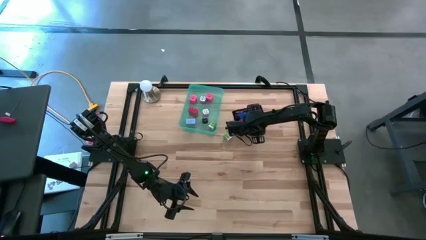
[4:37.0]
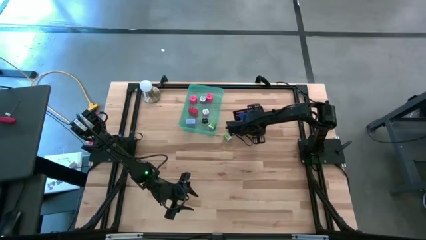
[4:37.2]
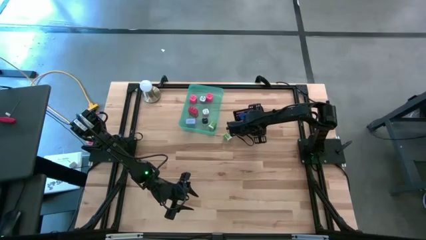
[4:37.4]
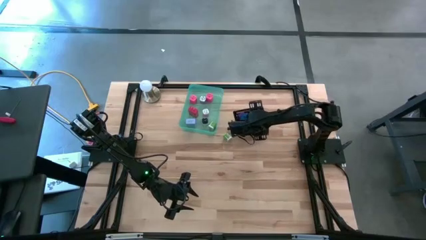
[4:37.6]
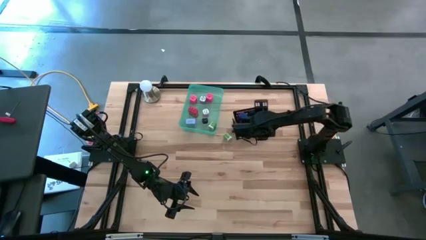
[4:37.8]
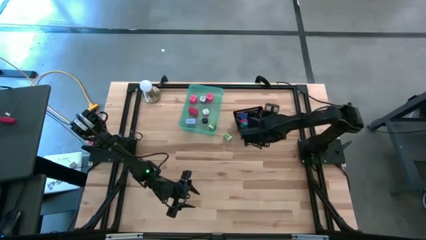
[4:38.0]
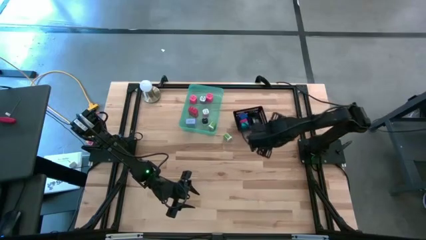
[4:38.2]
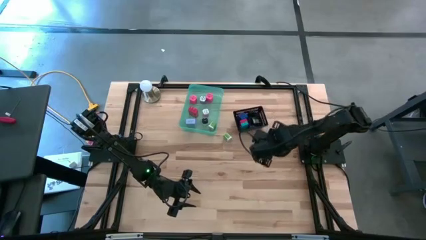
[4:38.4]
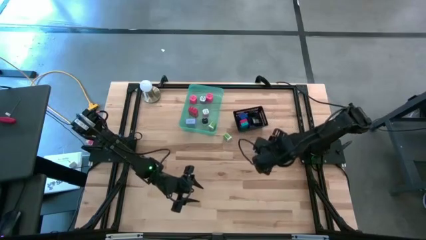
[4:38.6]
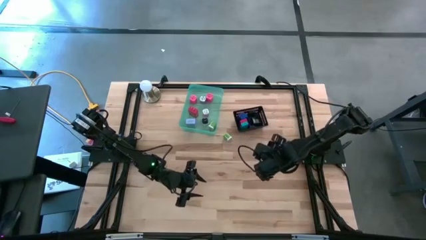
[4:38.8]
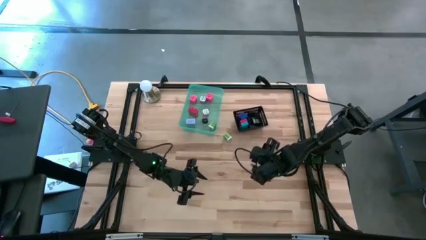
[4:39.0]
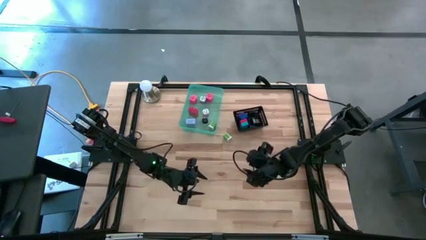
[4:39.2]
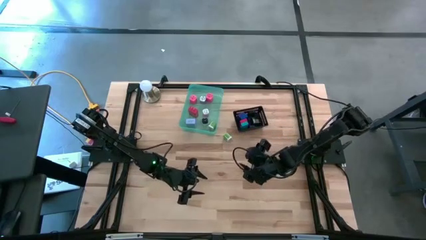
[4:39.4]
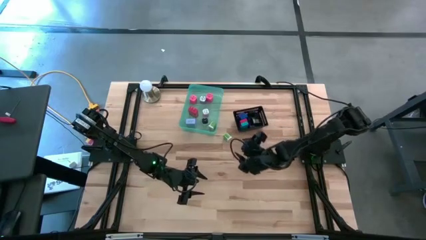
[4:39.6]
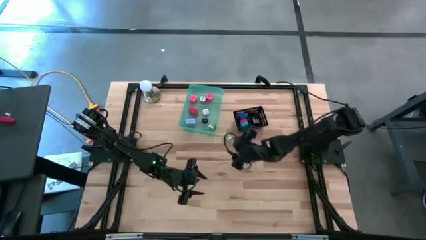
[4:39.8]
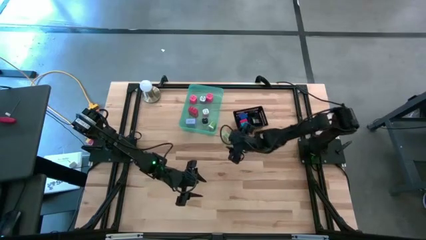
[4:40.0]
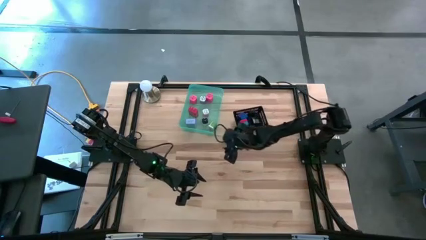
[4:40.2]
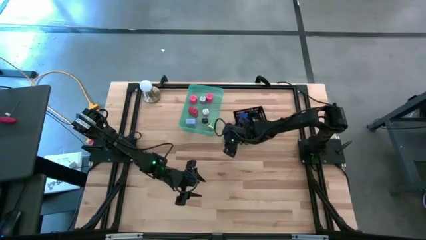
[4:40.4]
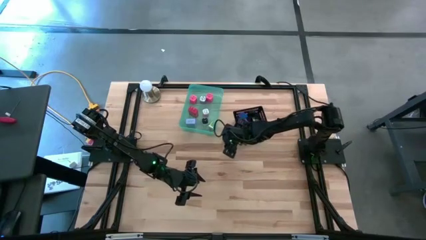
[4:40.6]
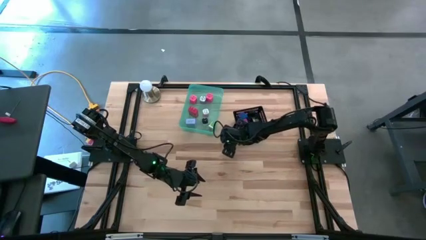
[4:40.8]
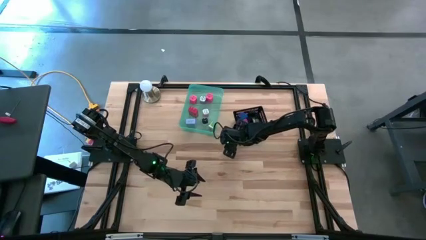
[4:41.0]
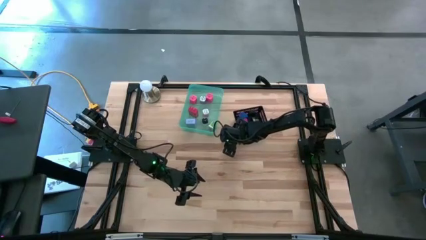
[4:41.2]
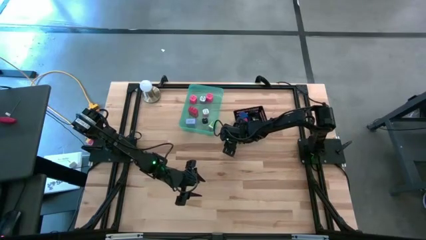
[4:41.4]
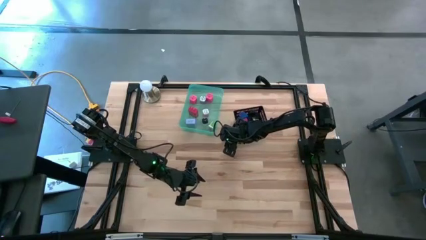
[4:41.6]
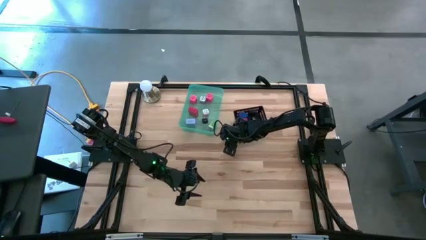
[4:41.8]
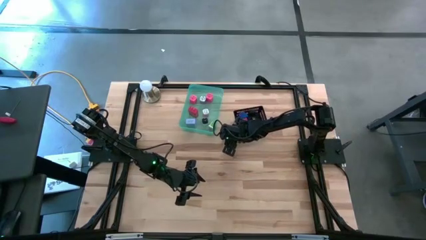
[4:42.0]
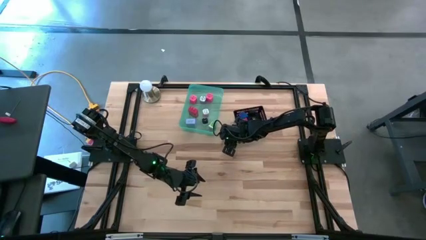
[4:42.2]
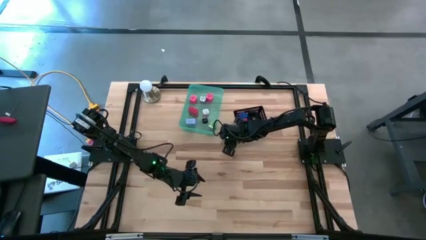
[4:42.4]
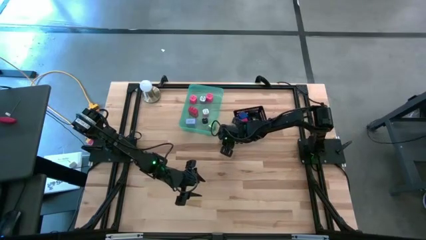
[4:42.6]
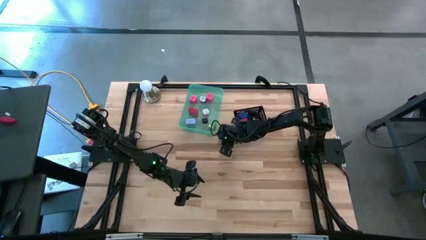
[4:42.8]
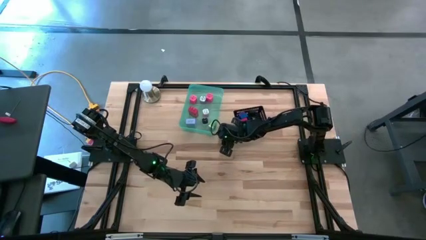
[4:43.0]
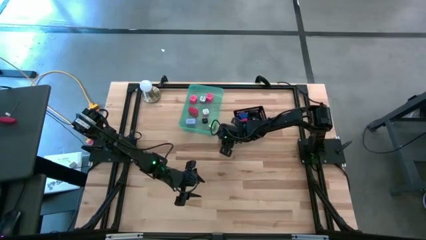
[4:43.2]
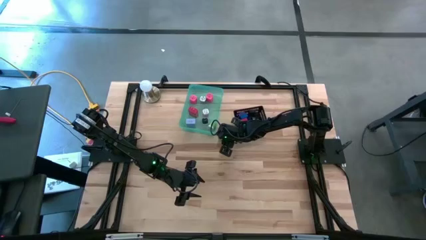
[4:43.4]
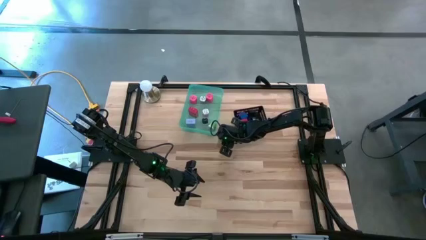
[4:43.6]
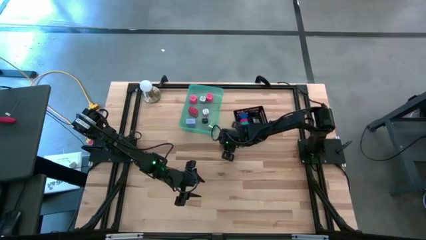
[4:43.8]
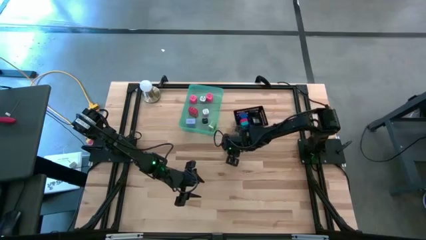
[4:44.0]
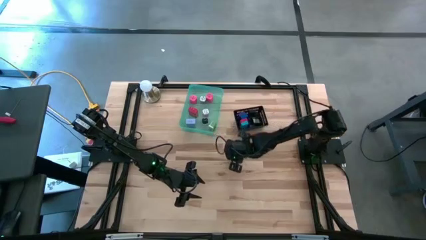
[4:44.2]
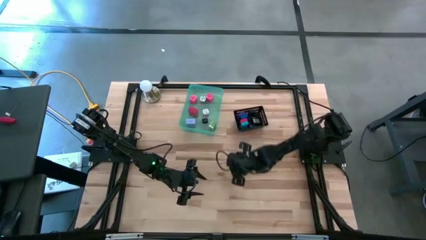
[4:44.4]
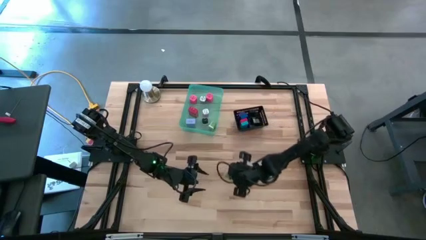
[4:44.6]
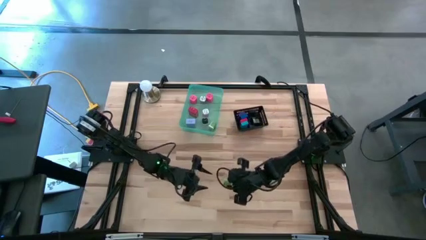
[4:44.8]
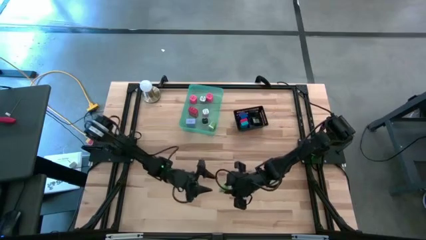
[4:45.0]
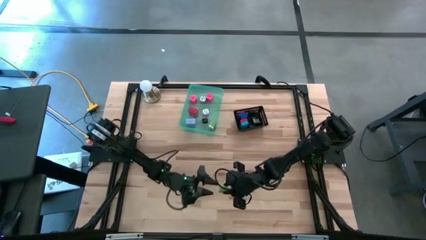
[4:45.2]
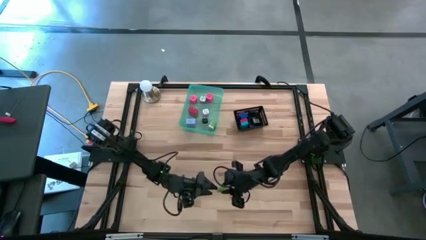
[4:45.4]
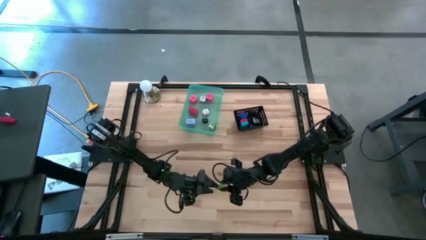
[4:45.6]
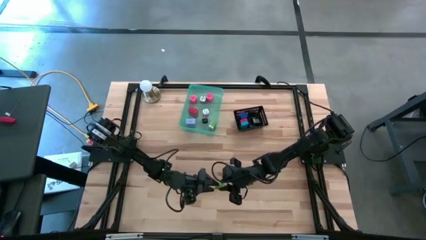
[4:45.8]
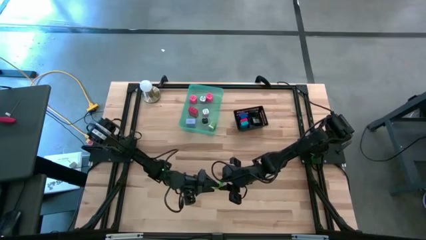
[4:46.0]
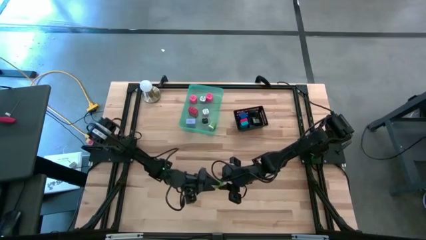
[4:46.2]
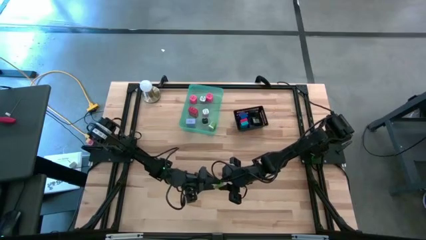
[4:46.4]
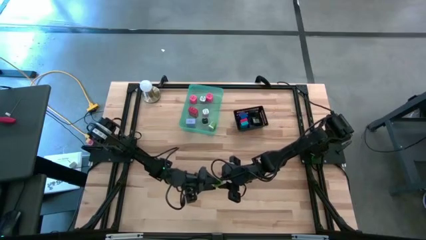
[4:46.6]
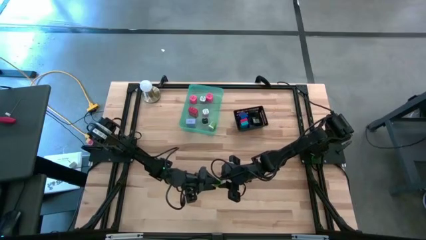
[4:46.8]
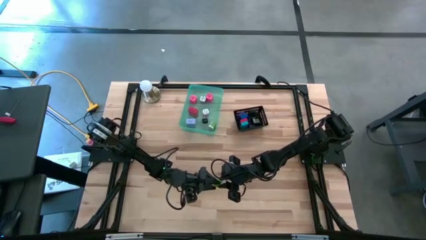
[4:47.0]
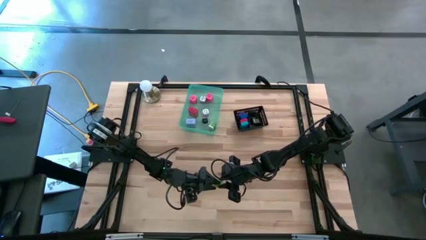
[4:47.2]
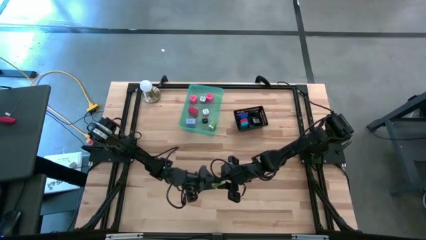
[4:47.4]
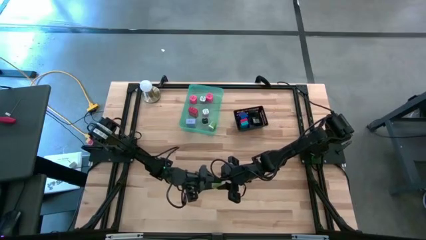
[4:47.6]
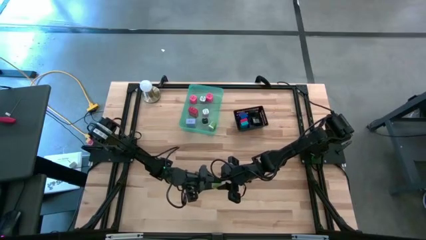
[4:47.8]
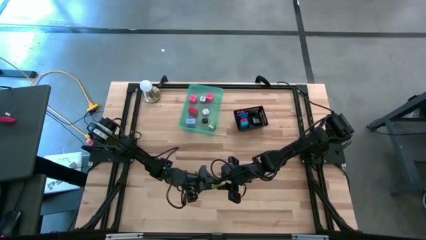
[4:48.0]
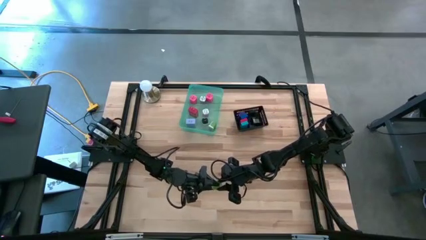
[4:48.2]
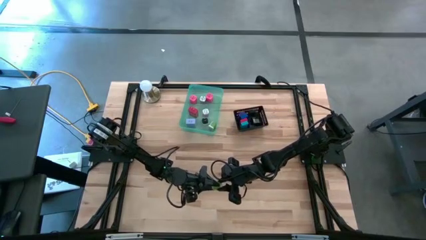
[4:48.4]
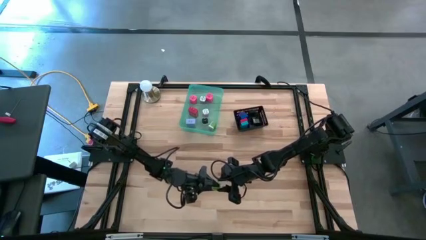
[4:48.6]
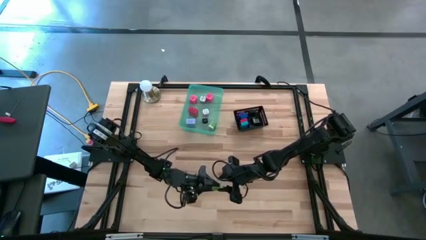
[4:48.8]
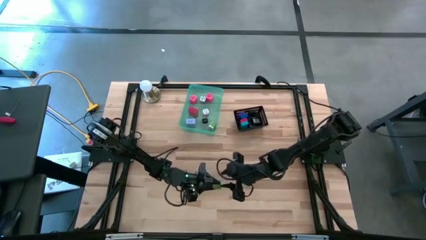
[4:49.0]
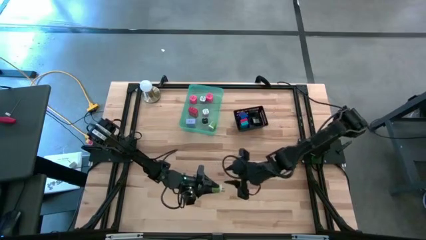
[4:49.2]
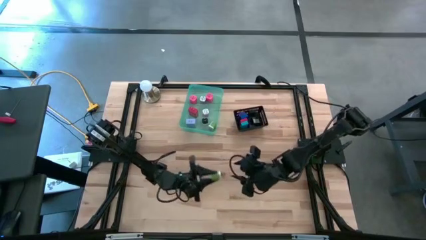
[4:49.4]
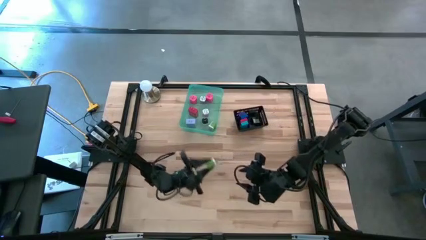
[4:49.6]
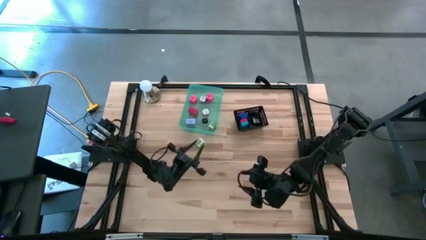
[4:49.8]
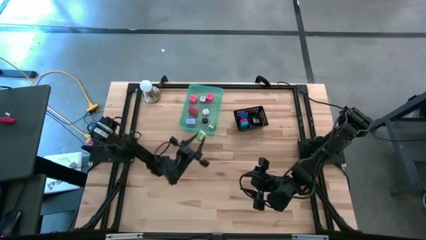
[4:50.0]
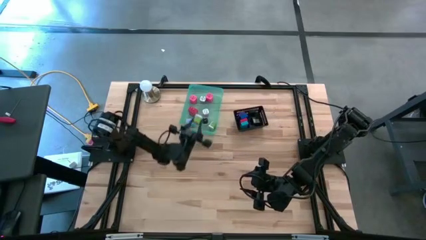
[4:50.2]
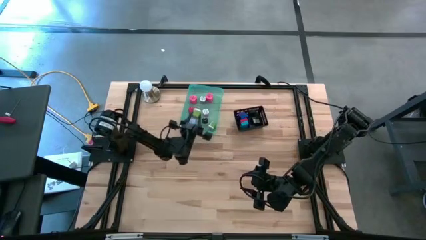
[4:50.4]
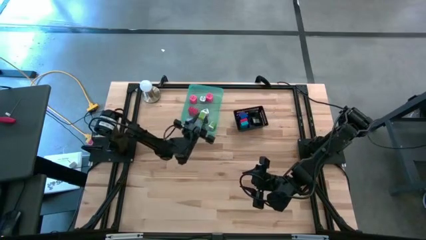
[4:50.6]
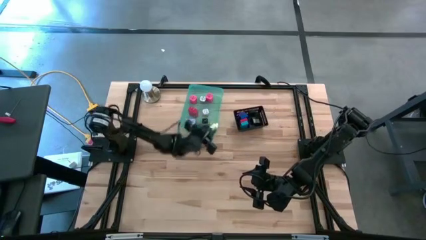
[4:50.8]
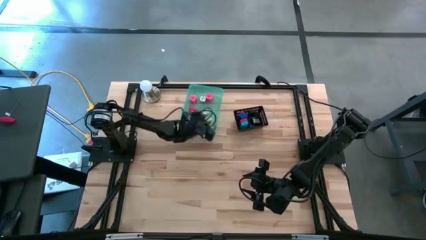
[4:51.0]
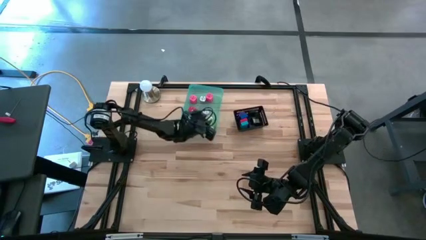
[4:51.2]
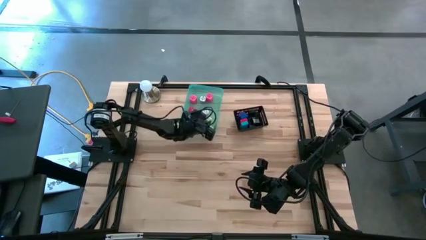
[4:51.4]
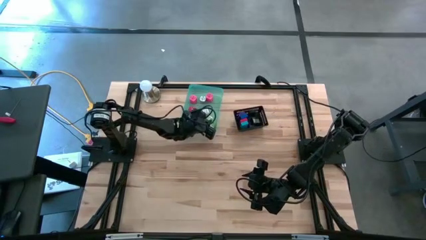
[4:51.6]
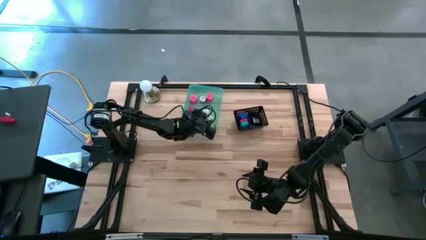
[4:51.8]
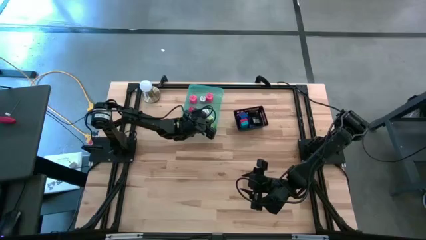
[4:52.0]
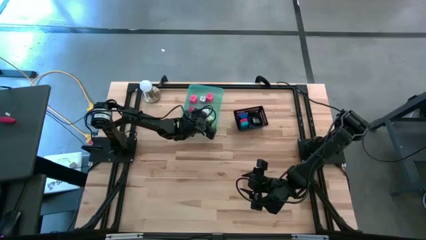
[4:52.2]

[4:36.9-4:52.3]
Task: Pick & Place Office items
Put the green charger adapter into the green bin

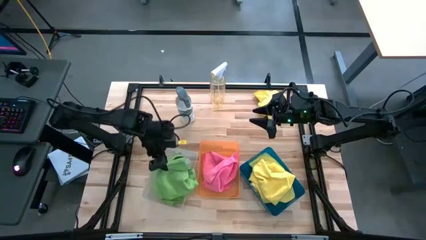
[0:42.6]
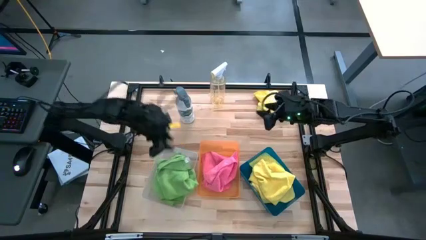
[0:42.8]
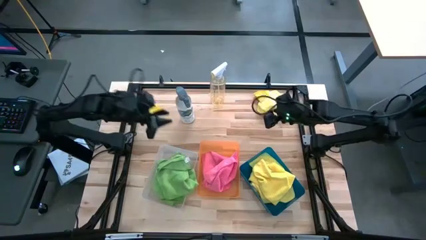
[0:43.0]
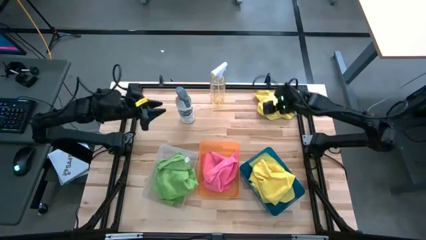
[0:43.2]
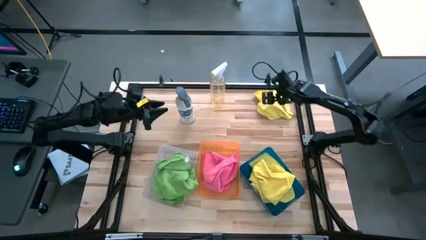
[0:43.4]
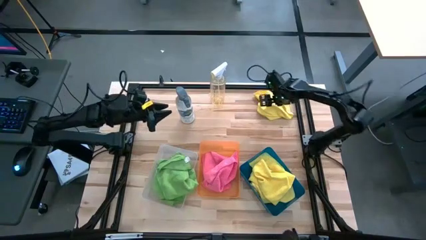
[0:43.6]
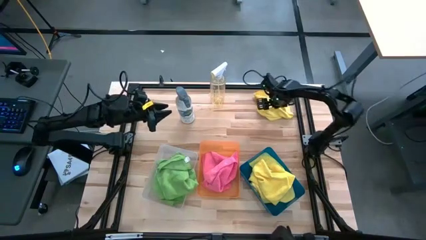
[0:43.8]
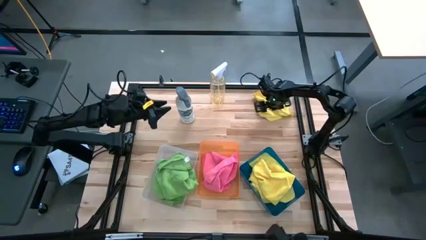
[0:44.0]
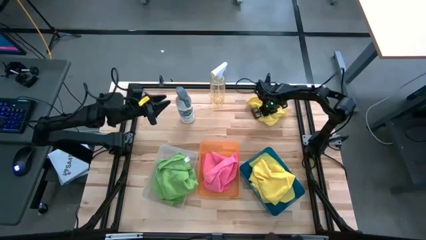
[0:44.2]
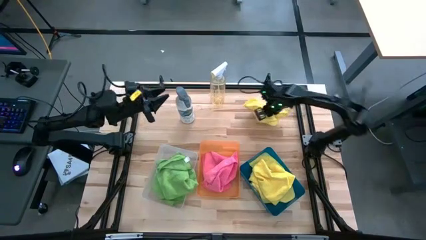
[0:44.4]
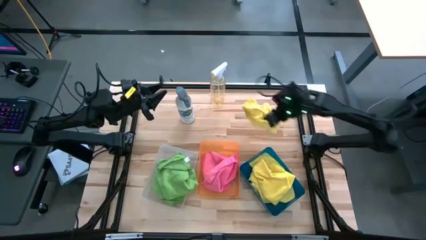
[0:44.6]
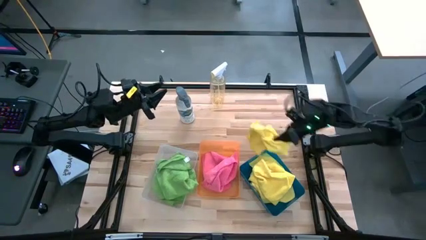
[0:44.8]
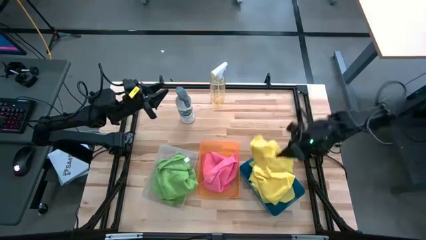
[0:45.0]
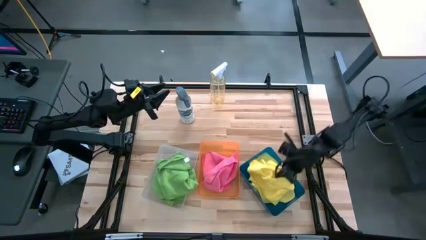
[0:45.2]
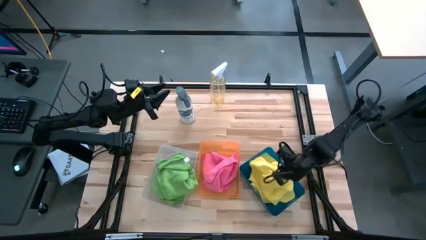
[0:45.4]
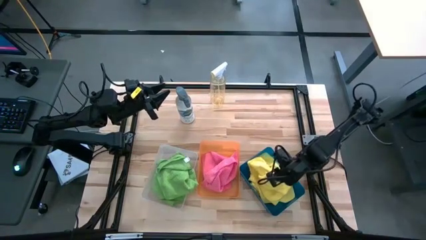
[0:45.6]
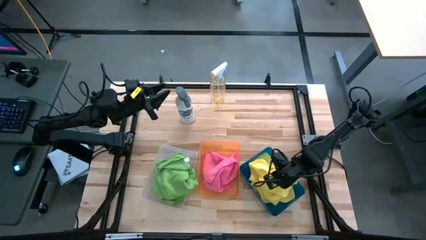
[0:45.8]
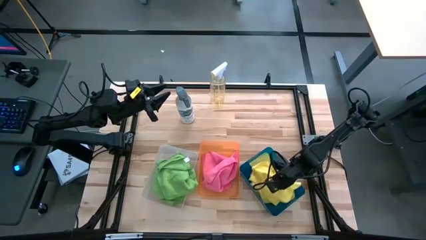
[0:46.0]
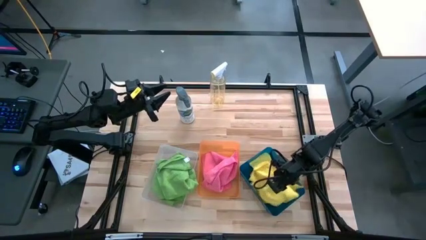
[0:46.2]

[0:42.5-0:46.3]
Task: Sort microfiber towel by color & place in baskets
Put the yellow towel into the blue bin
